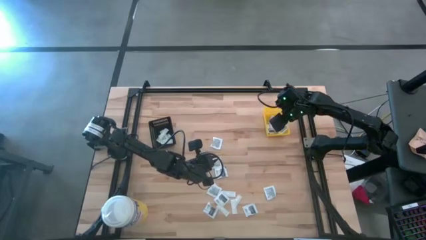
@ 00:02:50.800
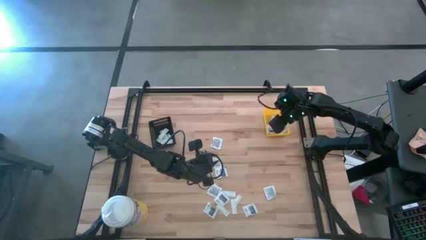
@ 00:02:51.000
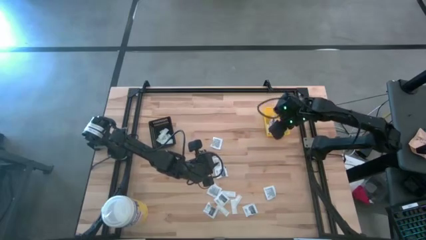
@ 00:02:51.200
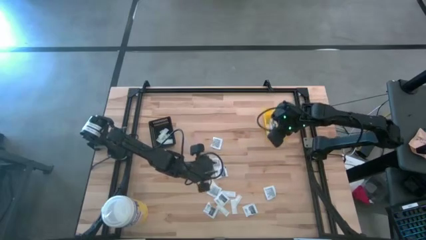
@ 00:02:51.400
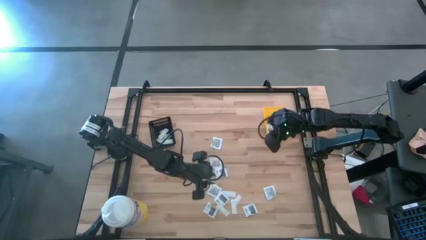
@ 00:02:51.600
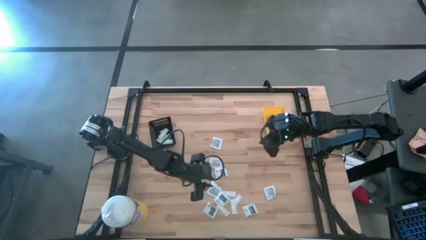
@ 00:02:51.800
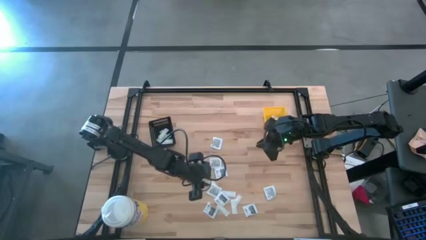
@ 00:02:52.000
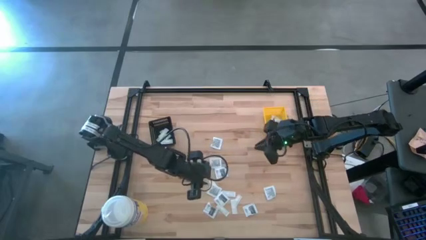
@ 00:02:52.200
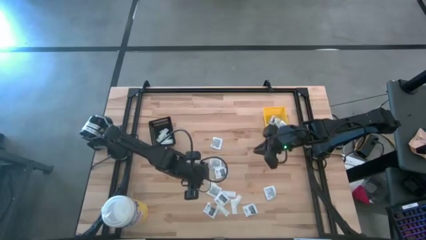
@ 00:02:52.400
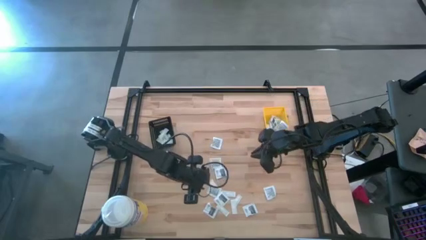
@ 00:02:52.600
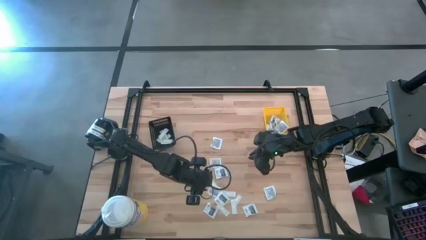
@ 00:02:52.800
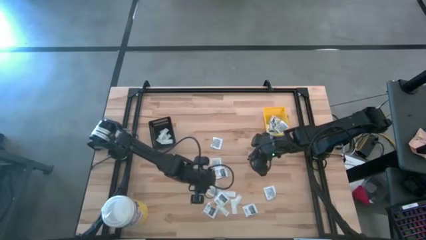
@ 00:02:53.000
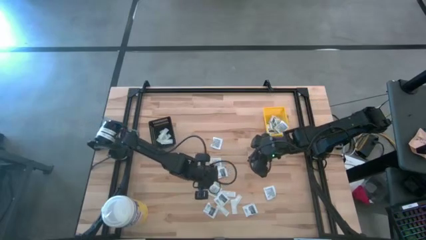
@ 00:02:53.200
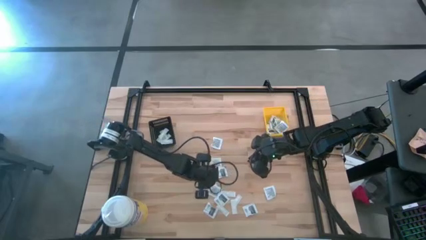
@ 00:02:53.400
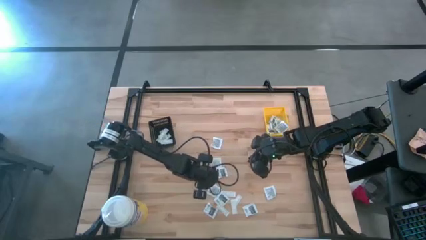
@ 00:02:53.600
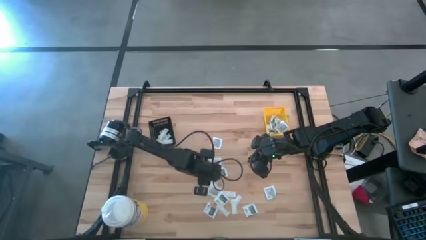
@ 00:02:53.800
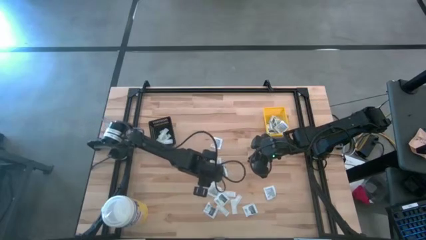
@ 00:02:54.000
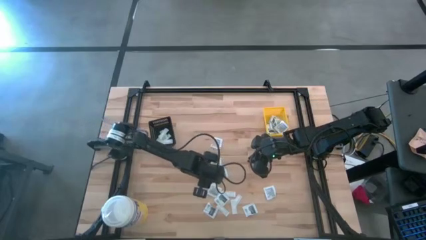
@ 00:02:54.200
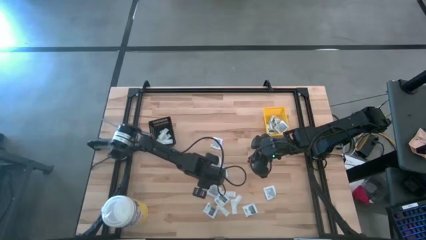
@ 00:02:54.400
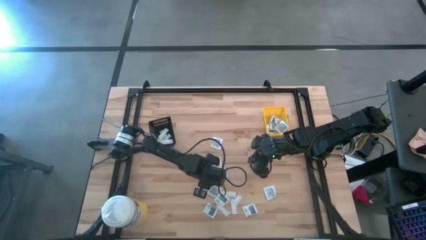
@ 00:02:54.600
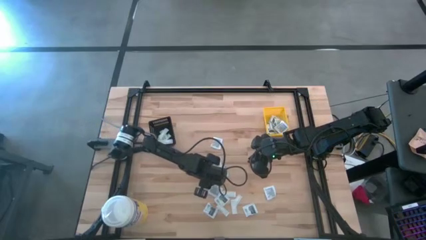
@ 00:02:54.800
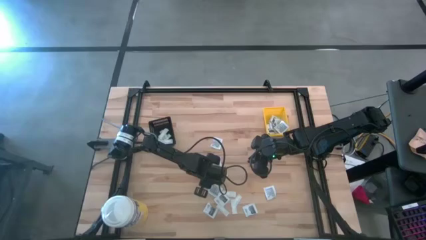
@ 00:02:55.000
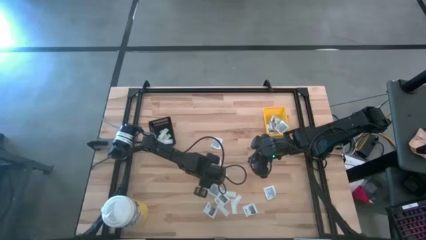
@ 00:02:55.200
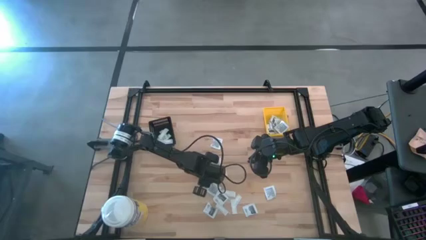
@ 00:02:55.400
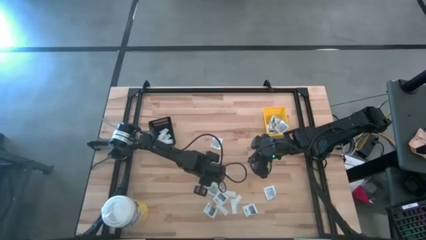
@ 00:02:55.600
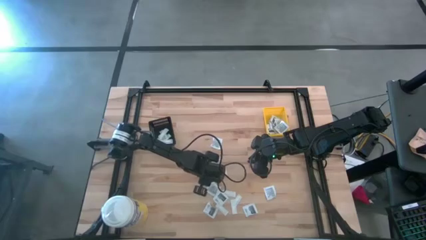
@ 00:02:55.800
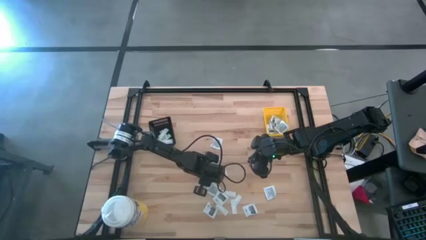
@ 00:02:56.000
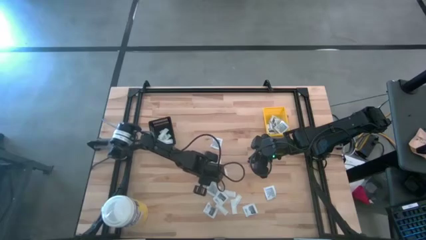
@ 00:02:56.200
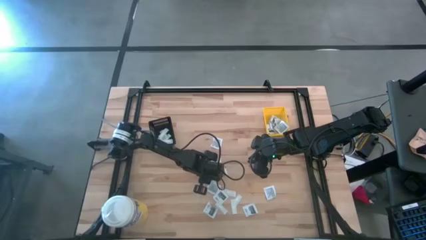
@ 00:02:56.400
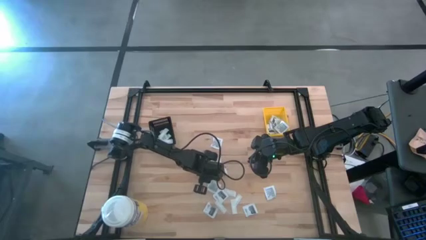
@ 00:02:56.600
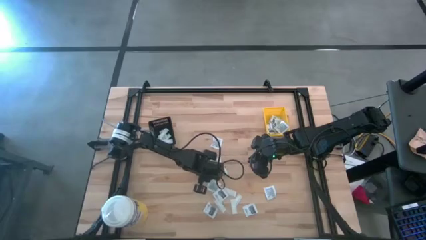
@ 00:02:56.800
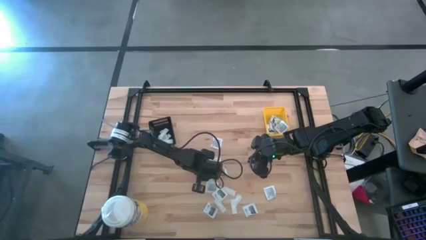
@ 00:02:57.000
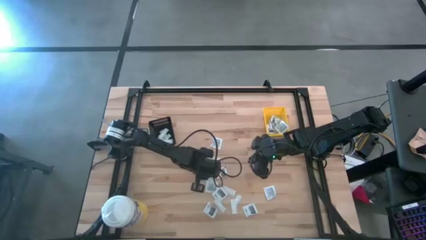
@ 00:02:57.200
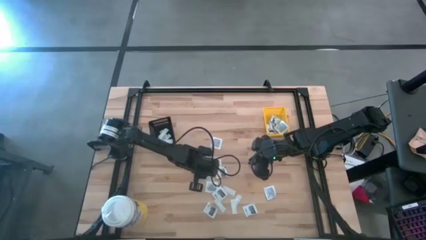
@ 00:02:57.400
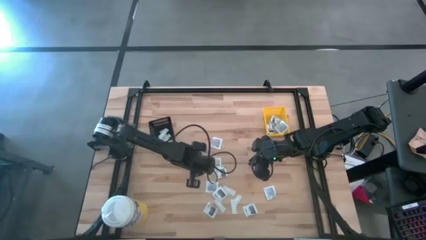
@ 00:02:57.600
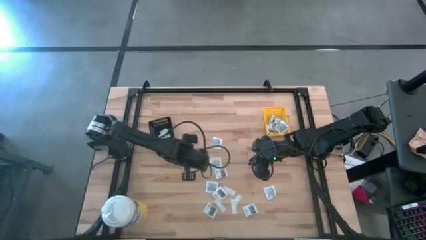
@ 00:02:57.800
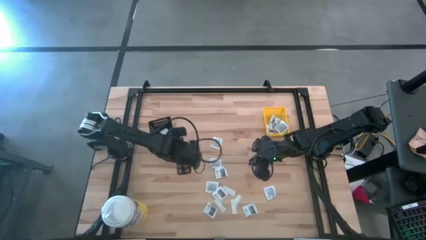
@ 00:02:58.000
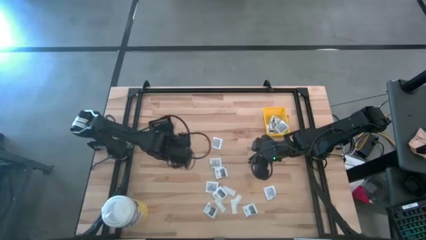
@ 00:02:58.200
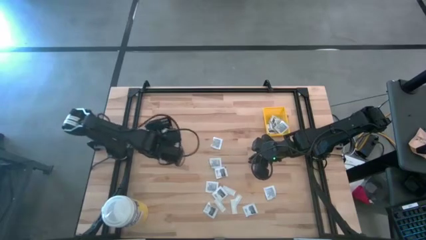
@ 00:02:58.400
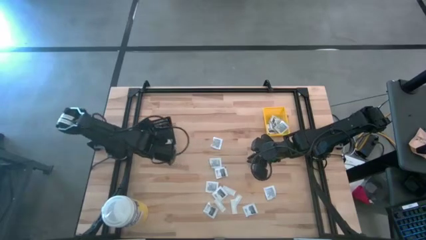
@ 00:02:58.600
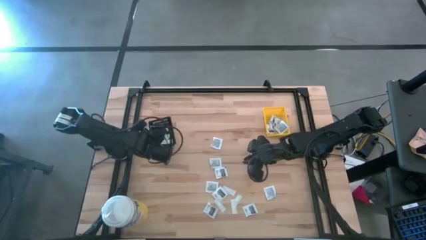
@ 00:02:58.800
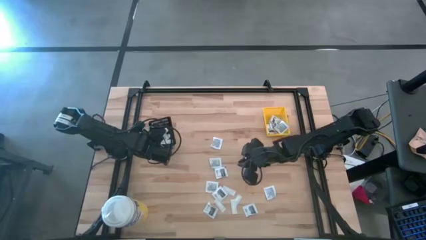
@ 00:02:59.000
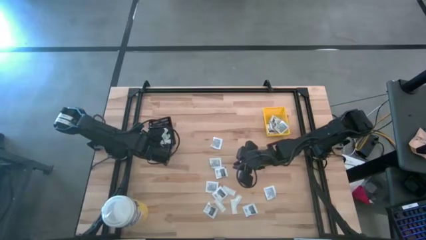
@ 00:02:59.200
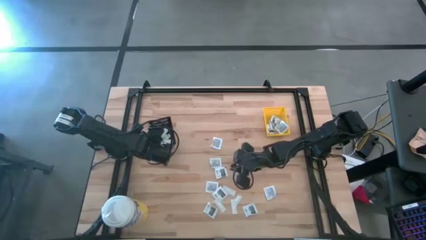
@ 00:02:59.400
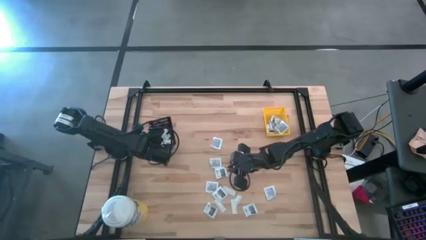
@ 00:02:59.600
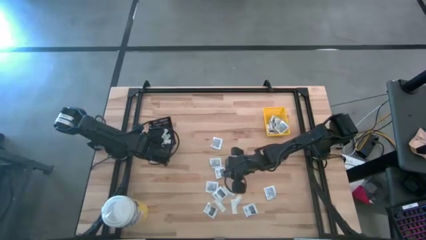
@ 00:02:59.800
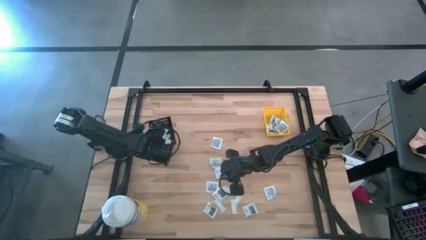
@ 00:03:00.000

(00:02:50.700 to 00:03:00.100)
Task: Pick & Place First Aid Supplies
Put the green bandage into the black bin

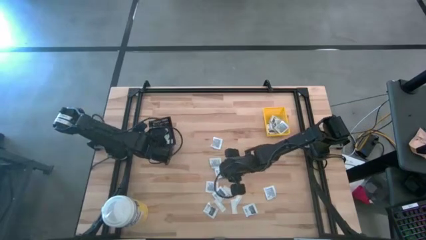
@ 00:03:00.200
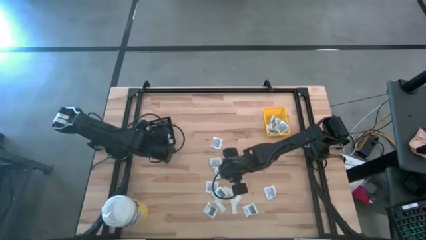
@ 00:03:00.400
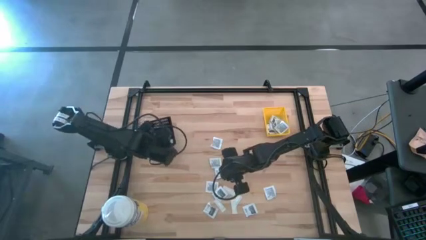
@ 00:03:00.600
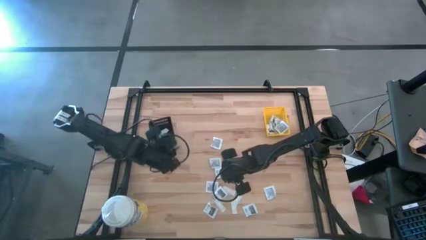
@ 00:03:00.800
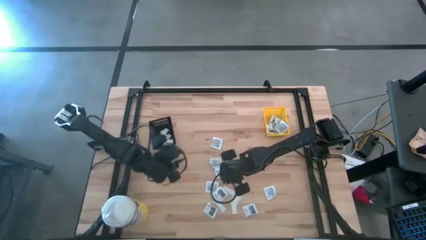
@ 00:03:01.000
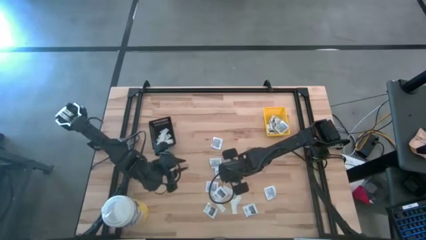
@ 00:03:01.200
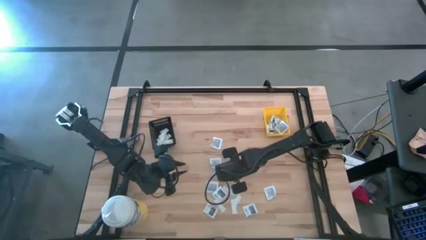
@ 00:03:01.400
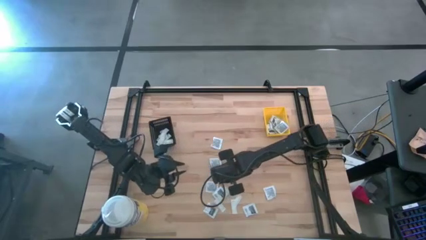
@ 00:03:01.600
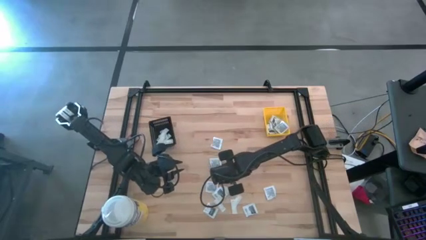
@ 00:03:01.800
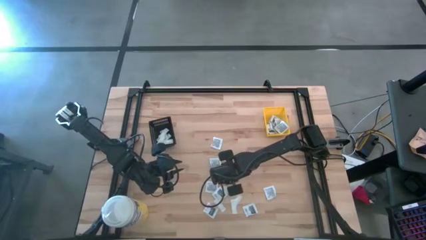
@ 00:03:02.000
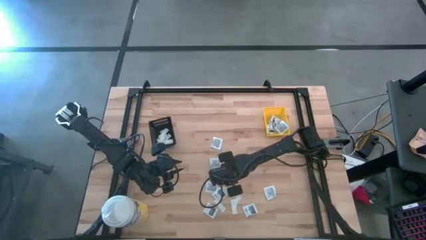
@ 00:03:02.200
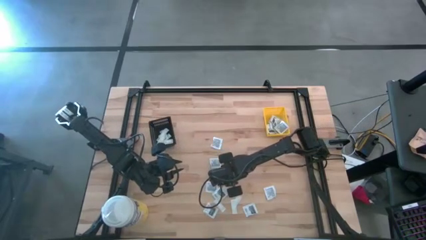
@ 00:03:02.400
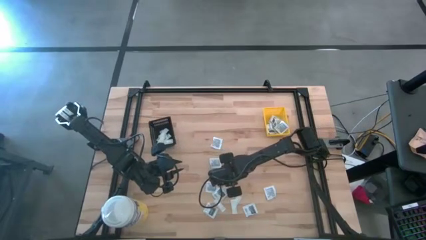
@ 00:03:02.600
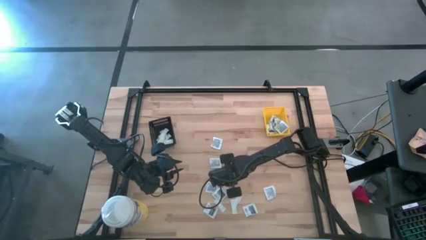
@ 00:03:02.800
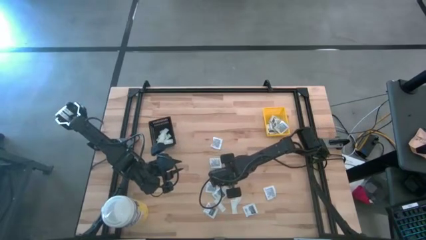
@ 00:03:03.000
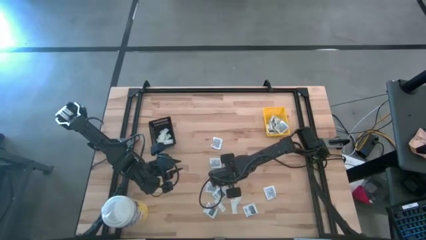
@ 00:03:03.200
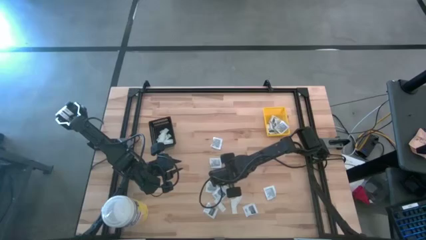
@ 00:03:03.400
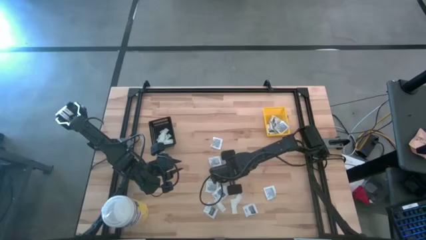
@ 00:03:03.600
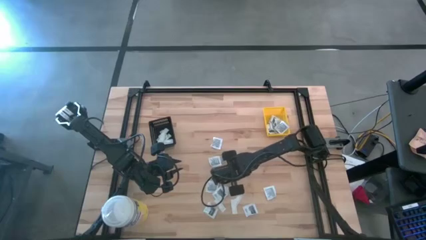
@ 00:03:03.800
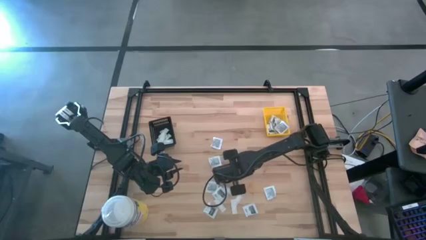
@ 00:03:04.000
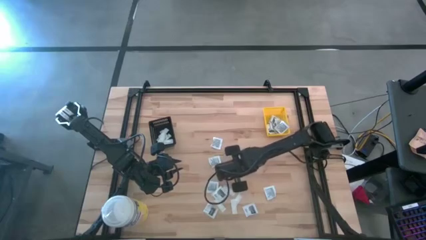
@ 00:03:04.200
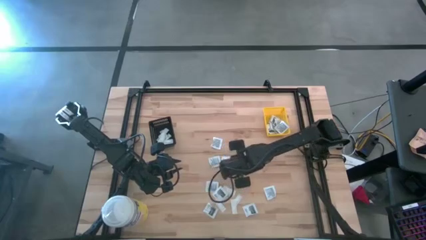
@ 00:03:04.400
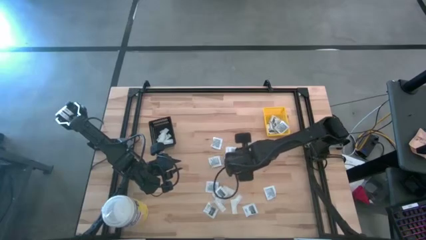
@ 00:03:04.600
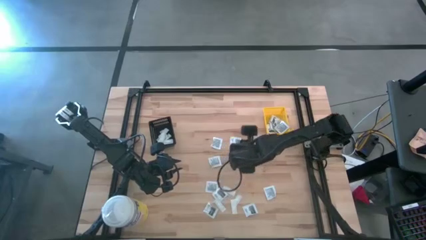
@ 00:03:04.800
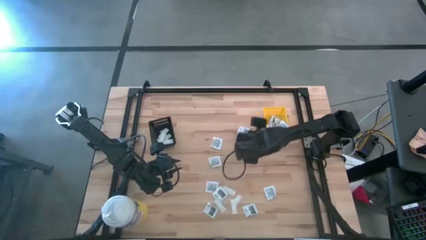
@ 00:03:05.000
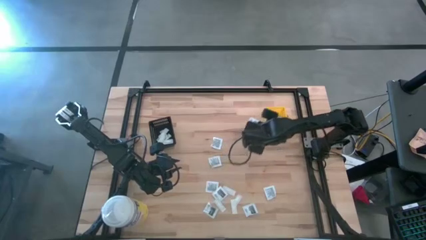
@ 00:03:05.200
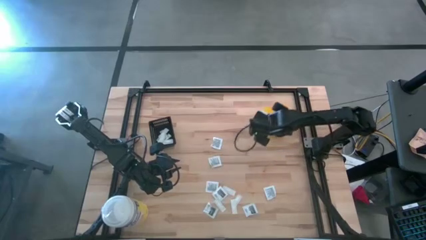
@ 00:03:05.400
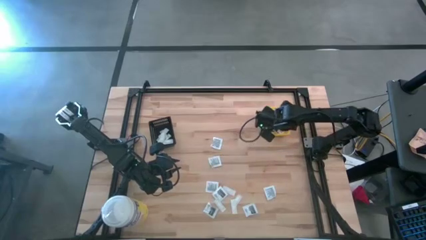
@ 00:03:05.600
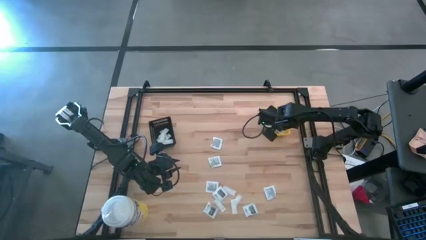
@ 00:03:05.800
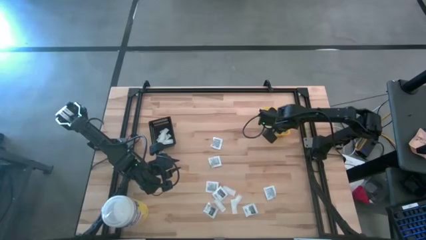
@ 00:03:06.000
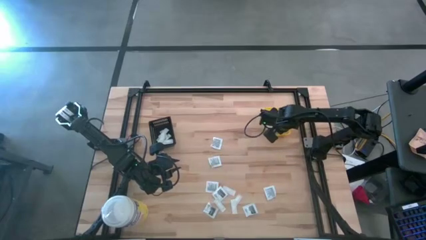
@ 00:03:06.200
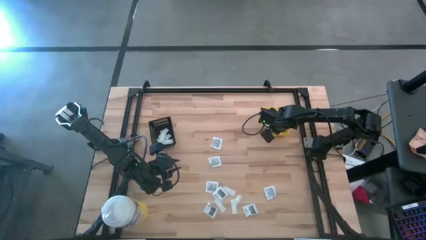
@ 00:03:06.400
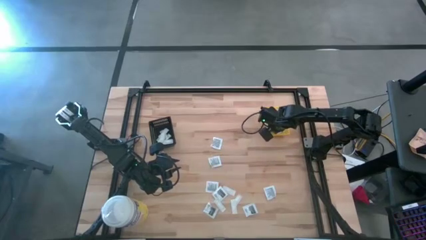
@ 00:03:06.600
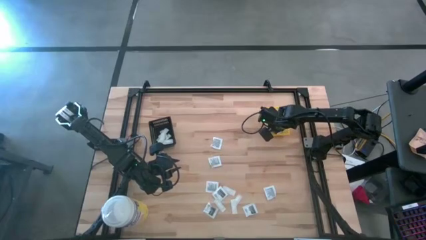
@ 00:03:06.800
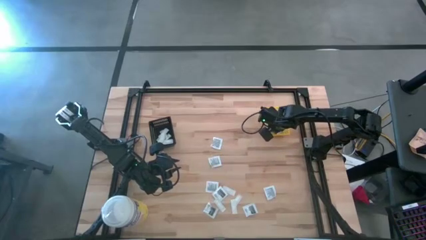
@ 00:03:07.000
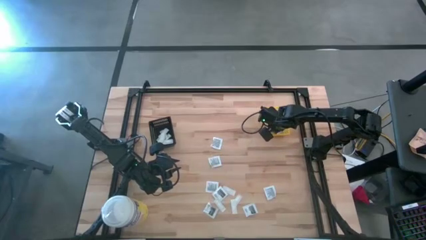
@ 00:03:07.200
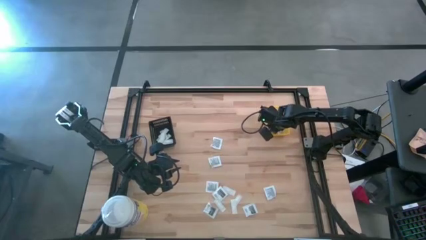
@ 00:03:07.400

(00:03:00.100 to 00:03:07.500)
Put the black pad into the yellow bin
